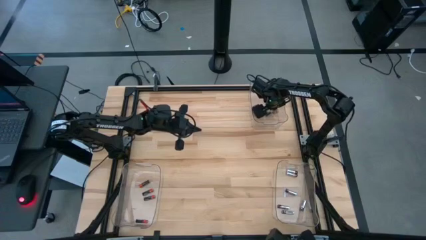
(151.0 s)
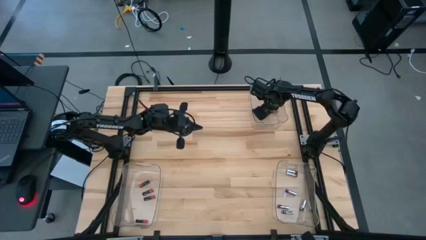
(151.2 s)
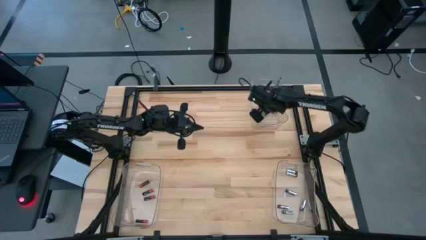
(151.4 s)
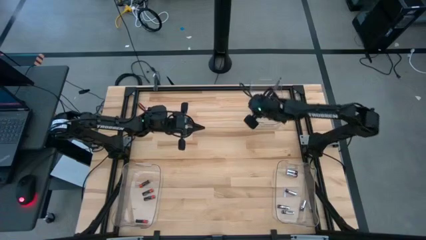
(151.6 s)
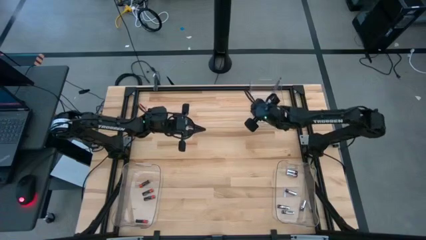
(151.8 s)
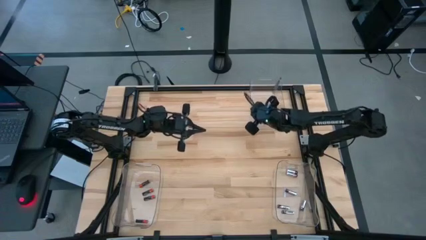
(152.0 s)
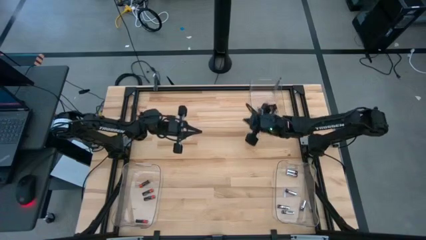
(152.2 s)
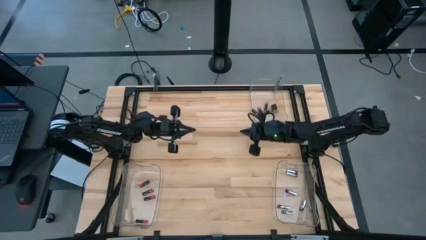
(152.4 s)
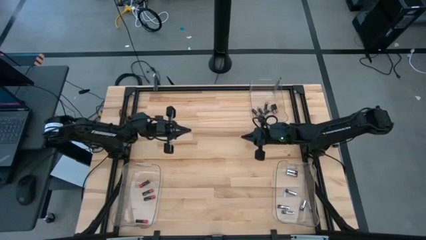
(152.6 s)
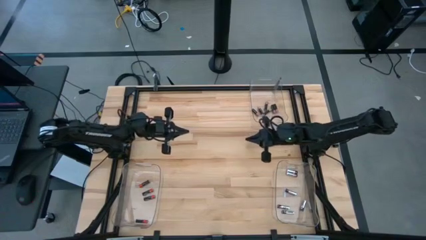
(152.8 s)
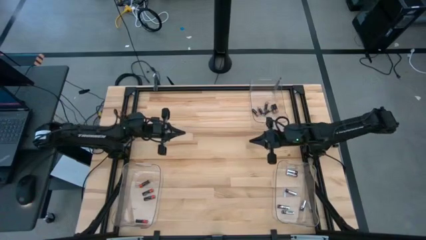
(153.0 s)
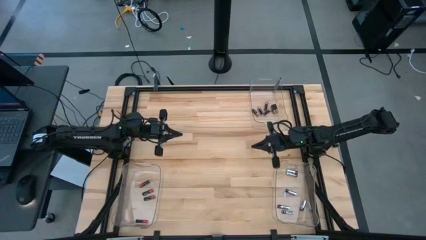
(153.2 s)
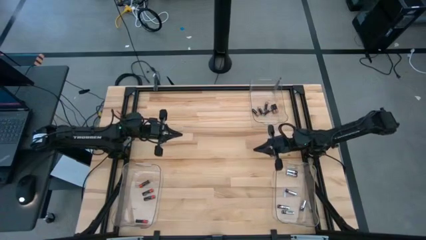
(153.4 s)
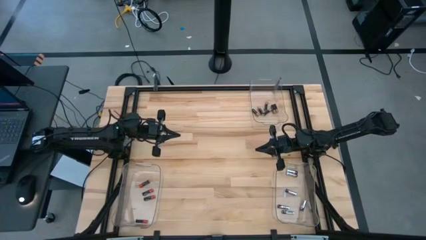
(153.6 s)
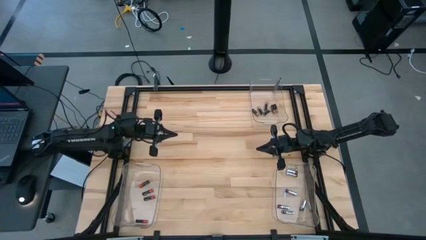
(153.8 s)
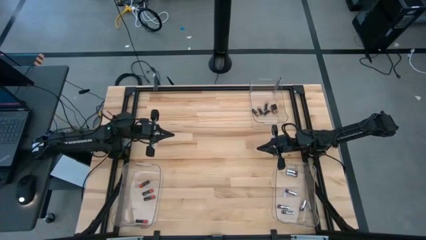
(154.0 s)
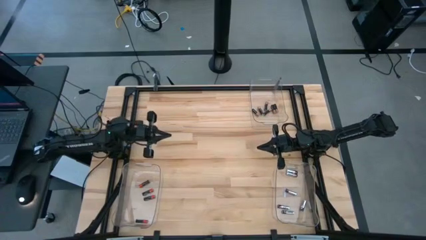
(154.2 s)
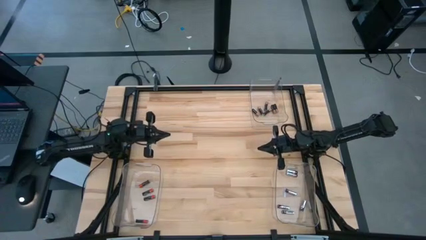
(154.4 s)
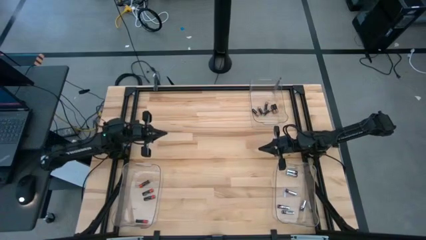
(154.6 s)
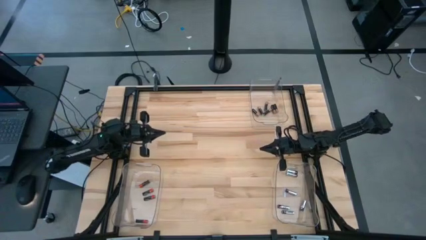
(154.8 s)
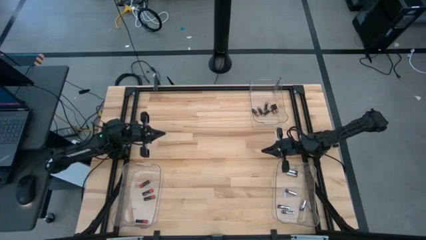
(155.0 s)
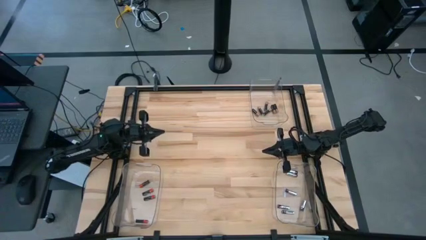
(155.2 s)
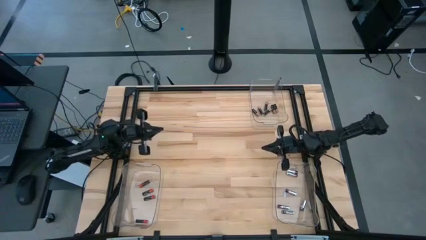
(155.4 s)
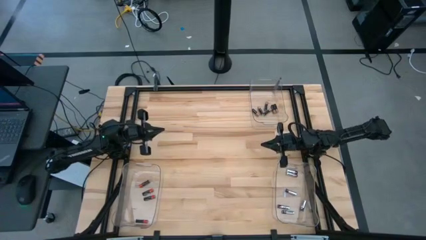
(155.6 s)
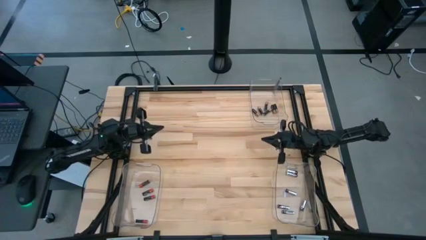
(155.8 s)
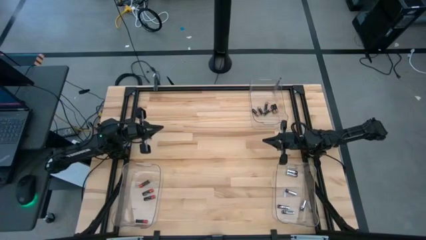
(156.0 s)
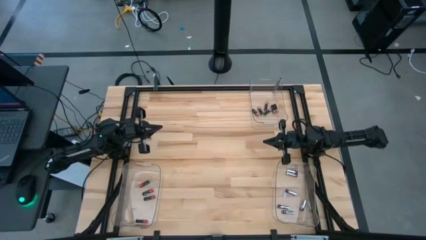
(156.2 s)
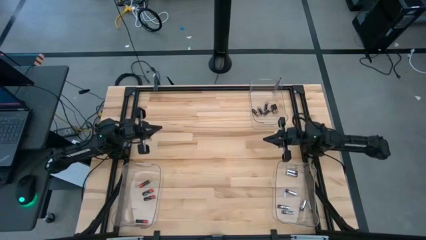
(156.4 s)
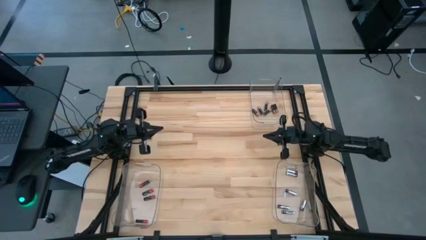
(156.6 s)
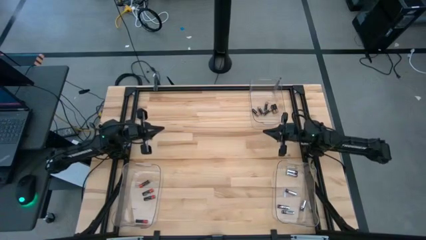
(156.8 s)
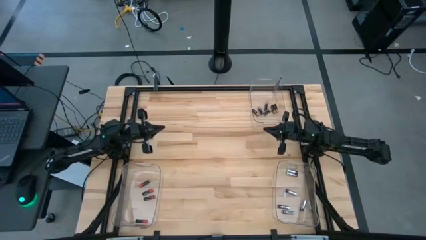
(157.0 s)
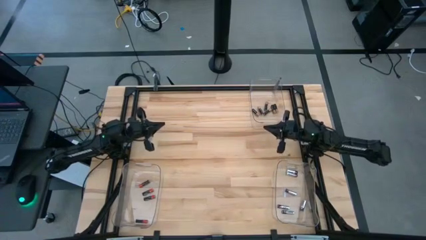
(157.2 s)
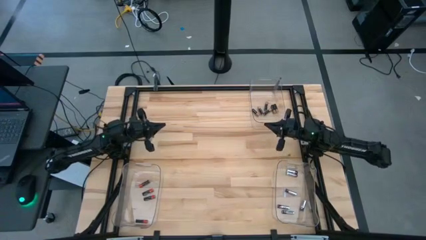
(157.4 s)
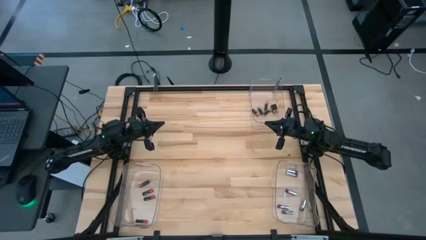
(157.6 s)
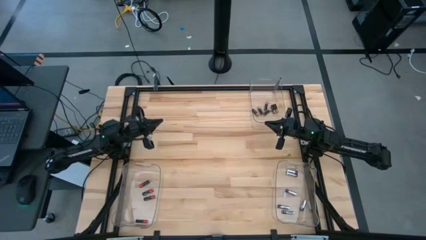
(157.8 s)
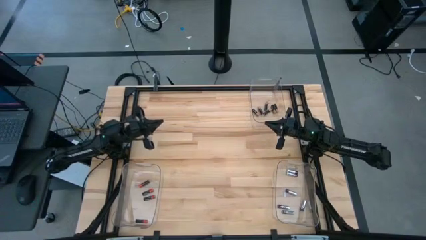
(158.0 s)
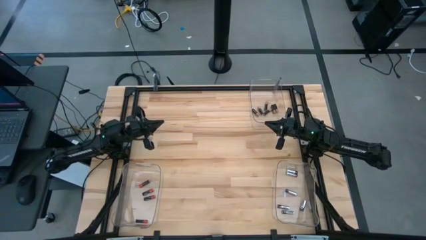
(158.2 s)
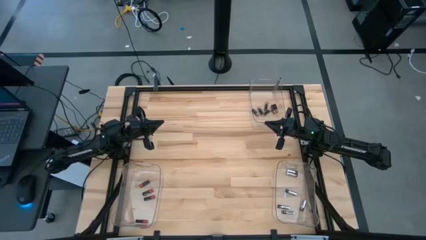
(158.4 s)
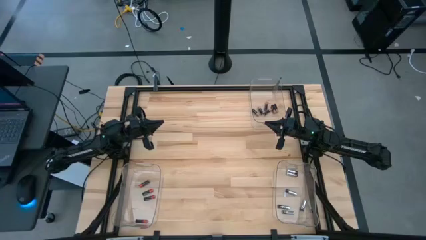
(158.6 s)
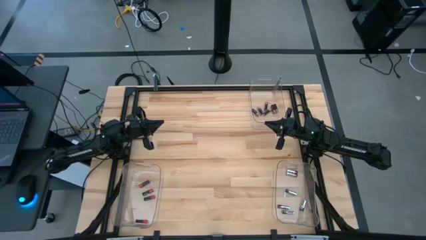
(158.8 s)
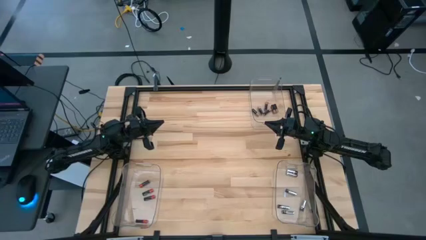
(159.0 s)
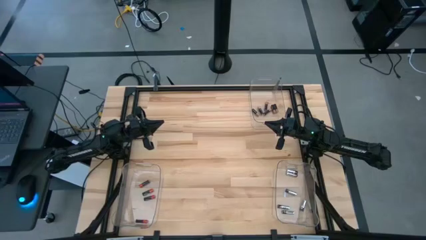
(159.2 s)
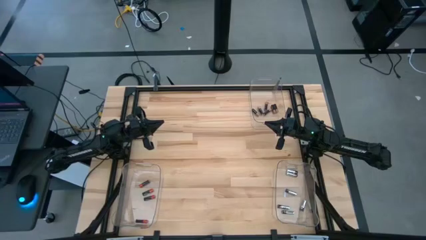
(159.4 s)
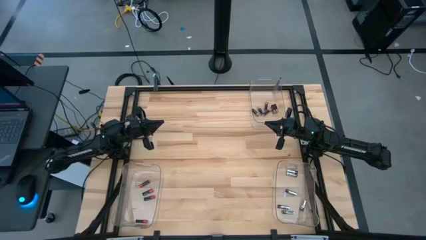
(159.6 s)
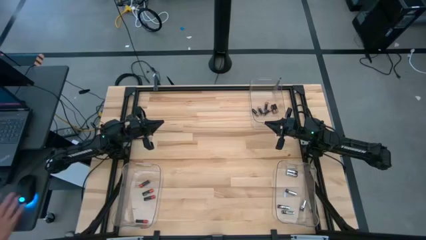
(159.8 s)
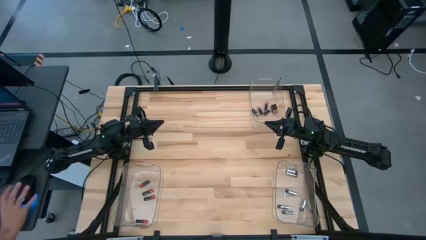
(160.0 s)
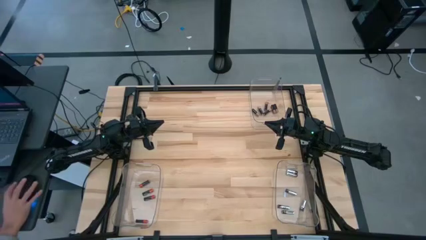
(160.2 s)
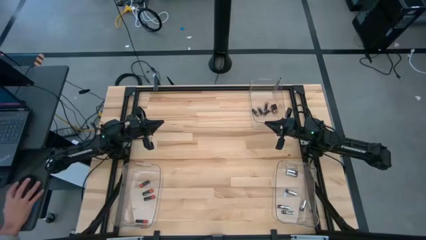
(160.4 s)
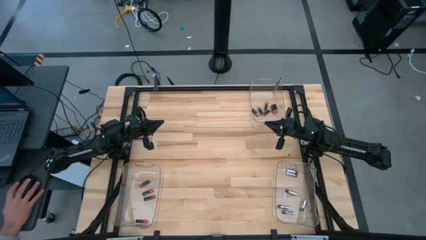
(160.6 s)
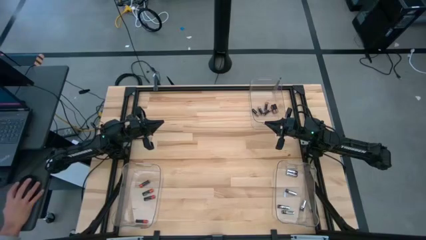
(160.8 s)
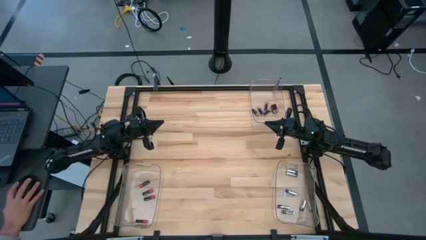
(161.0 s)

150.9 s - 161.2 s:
Task: Sort batteries
Return to Home Position

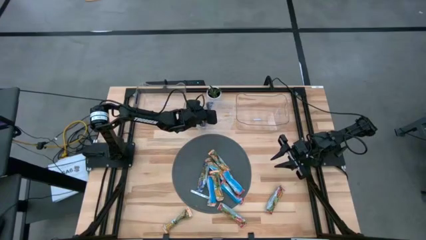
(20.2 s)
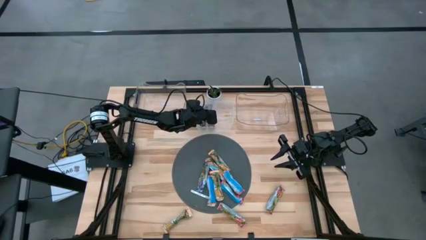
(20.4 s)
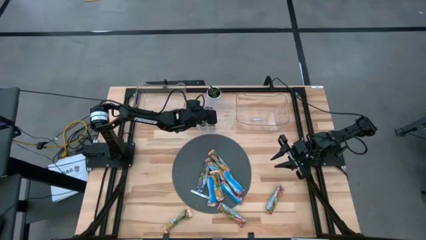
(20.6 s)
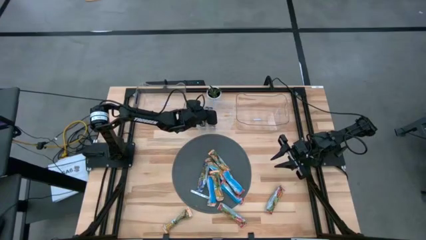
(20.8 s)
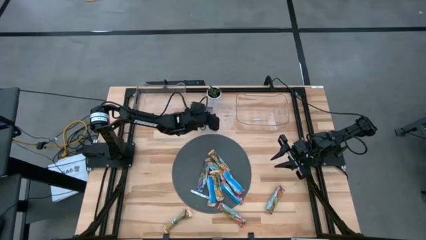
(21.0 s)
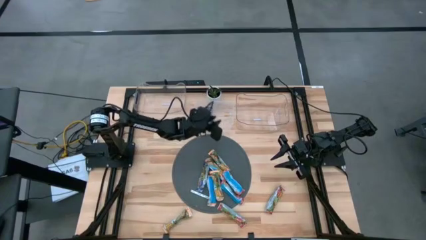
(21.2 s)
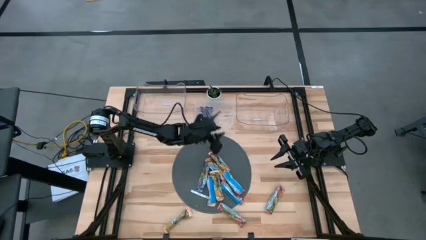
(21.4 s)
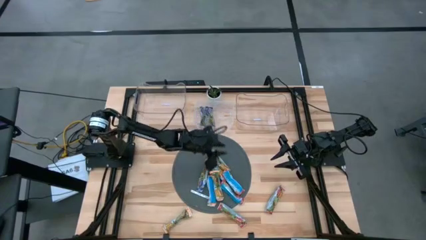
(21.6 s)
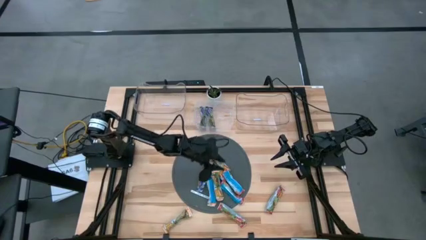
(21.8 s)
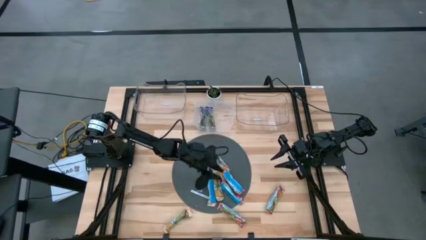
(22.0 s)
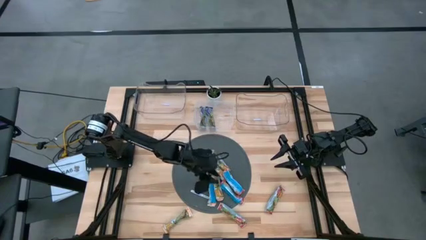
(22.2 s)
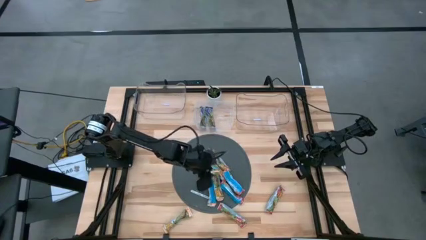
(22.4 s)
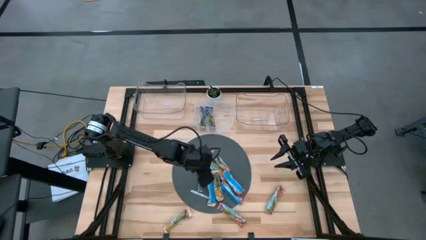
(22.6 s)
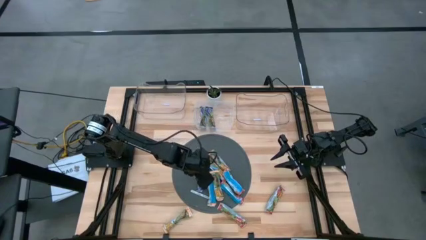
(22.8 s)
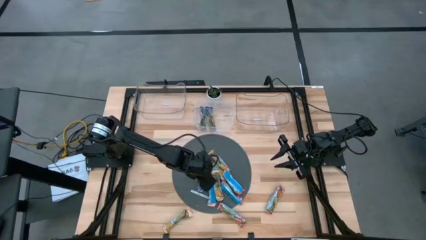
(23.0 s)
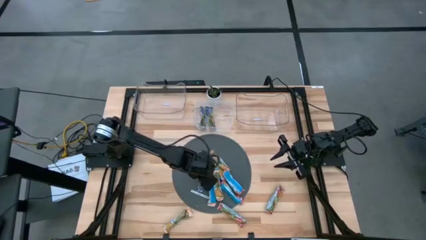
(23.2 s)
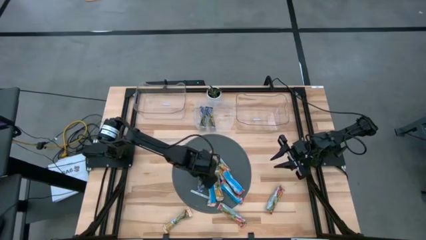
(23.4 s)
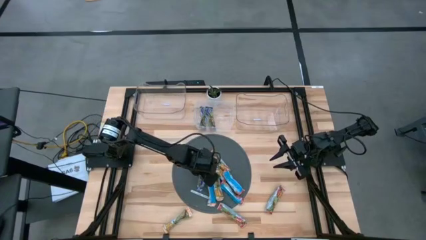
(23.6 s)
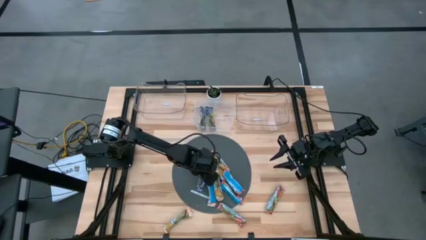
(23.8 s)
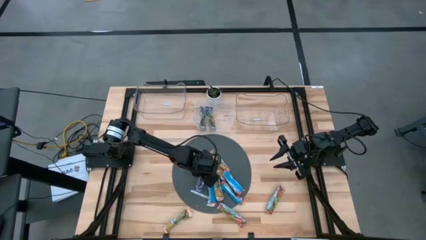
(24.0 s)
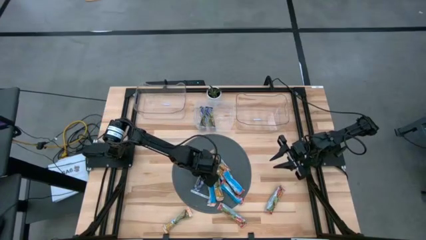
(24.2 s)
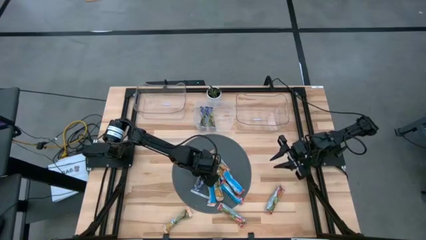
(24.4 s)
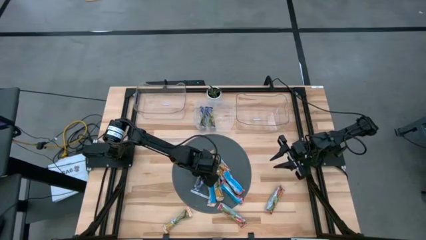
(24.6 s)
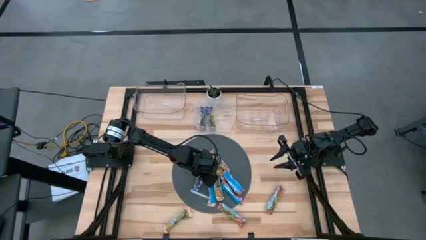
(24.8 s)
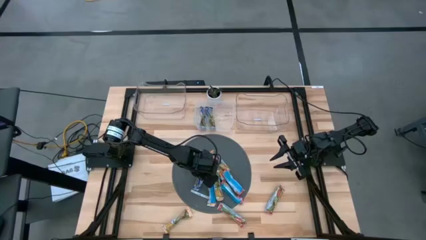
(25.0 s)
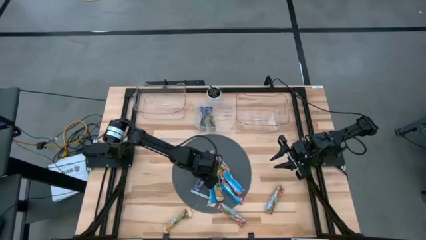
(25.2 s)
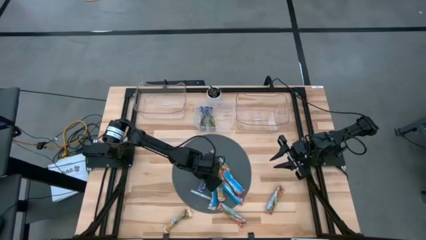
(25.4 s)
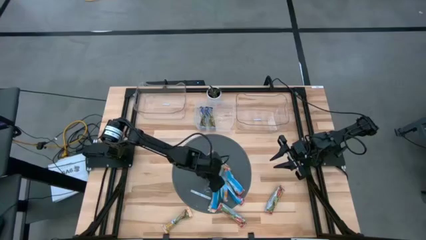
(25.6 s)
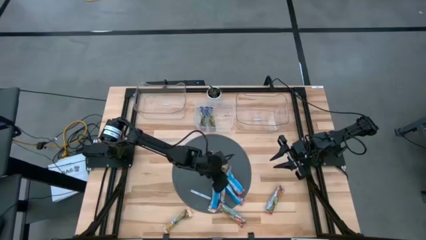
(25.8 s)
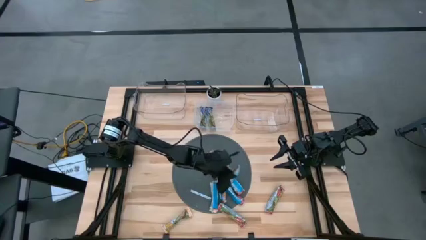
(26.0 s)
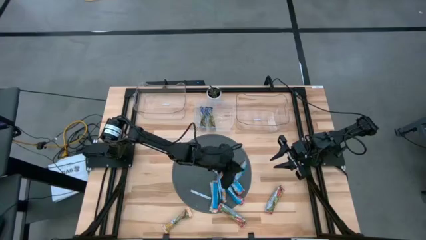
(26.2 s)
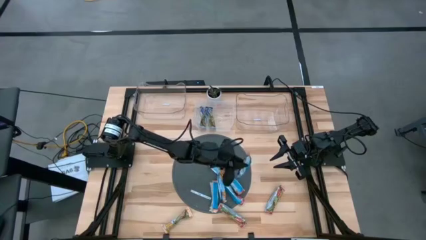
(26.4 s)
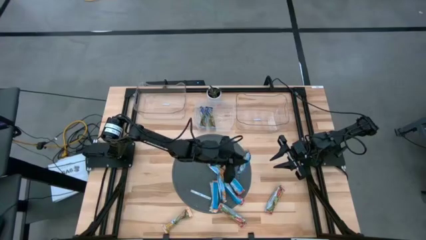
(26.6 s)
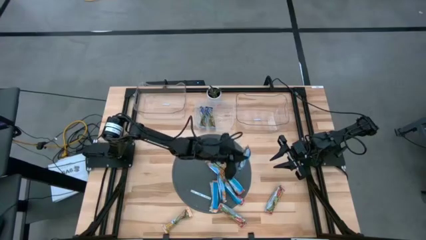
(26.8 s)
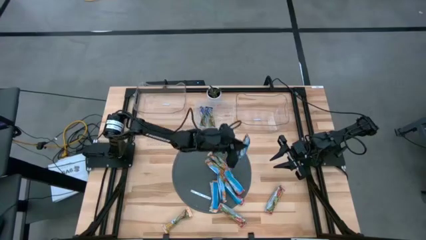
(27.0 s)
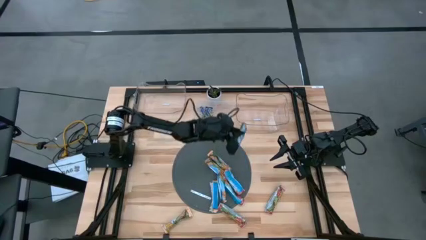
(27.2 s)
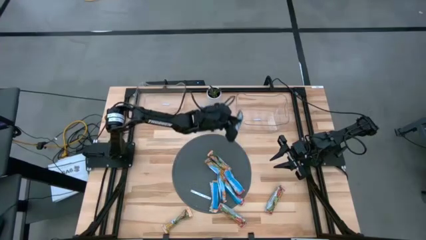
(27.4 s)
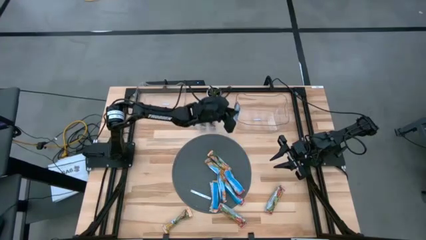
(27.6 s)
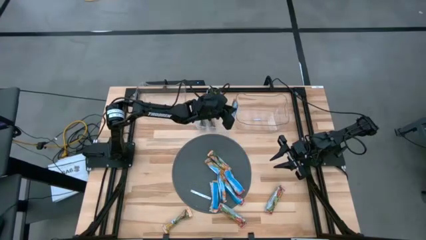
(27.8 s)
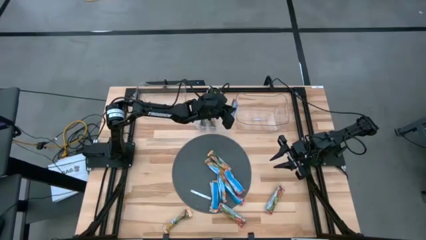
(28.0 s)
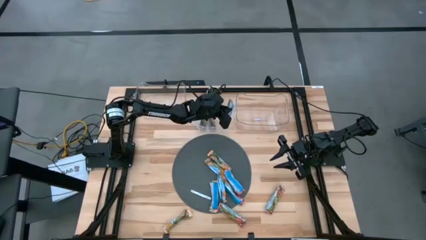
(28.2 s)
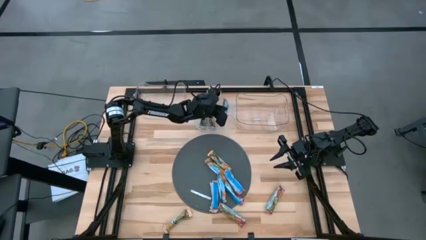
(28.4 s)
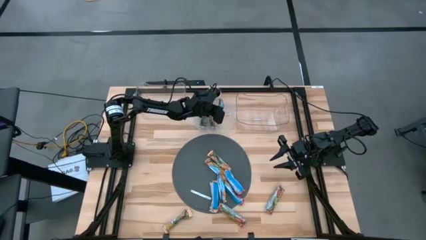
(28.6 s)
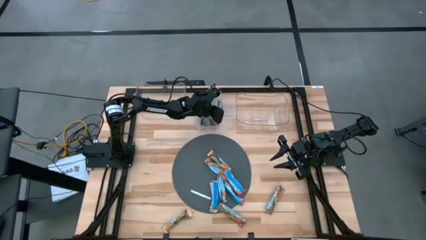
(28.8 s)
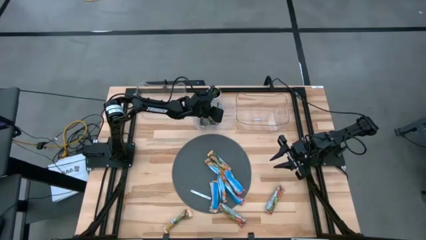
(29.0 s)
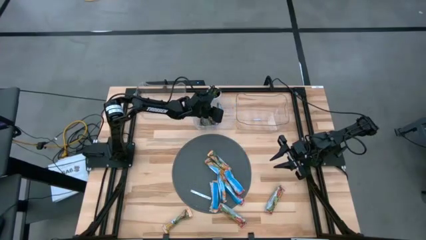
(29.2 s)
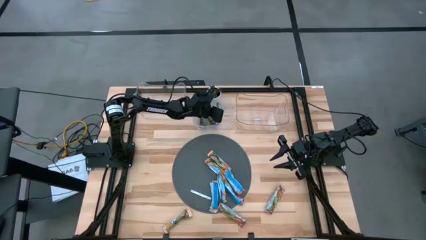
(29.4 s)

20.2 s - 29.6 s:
Task: Pick and place Granola Bars by type
Put the blue granola bar into the middle transparent bin
